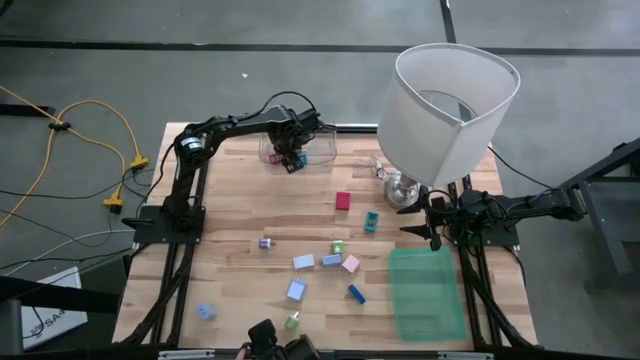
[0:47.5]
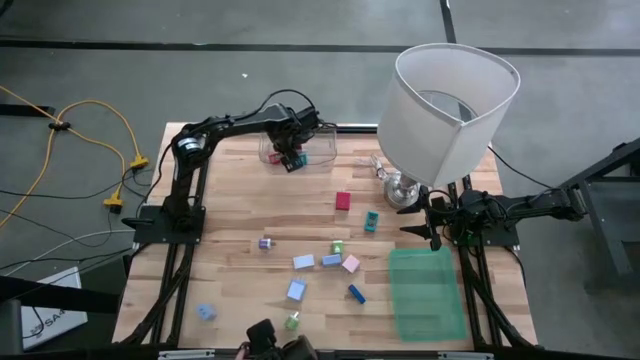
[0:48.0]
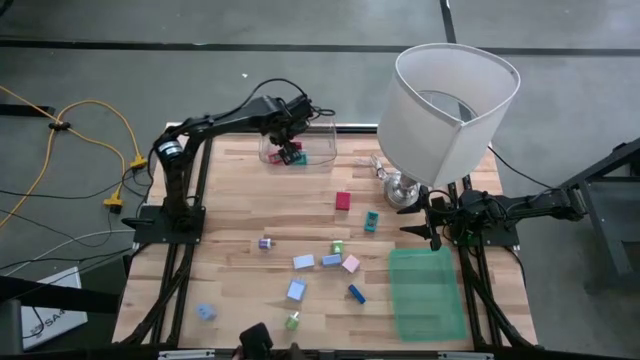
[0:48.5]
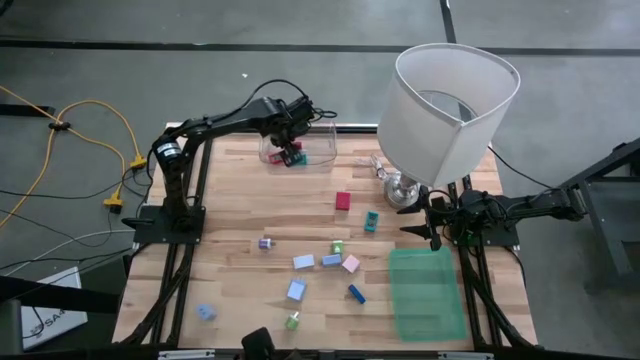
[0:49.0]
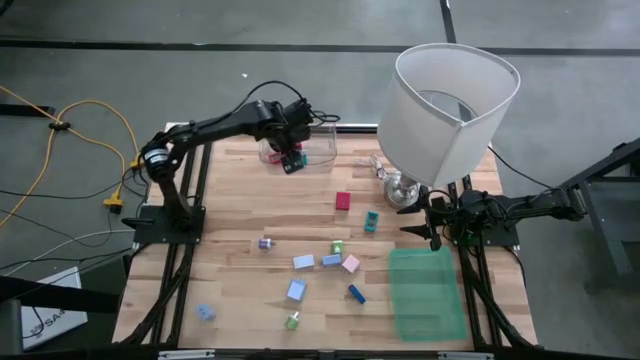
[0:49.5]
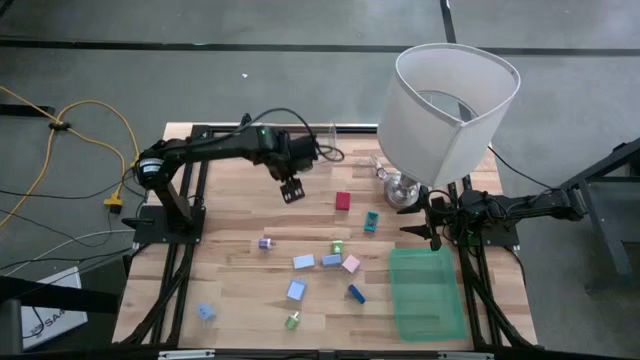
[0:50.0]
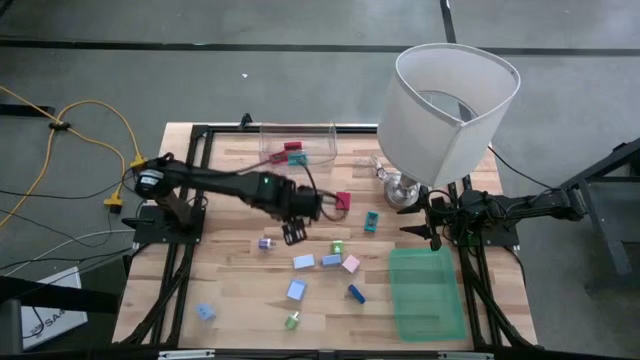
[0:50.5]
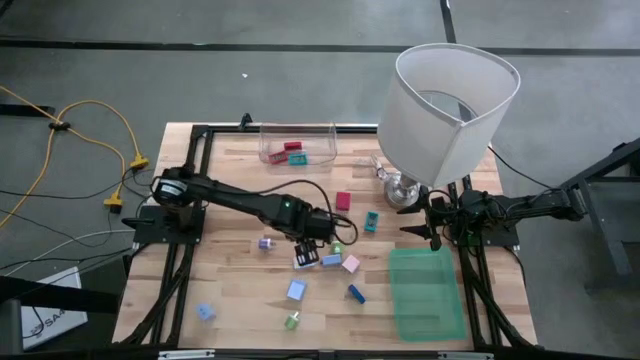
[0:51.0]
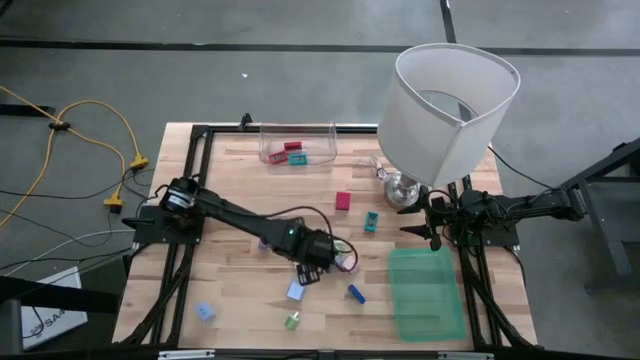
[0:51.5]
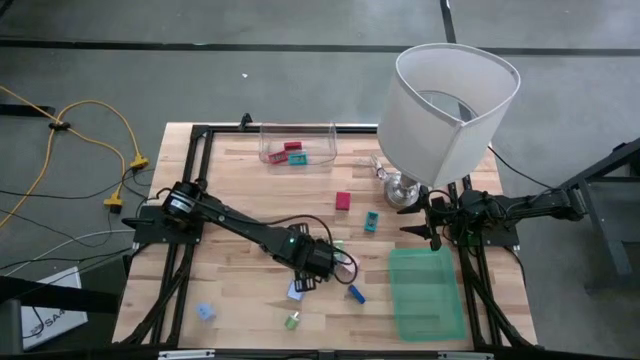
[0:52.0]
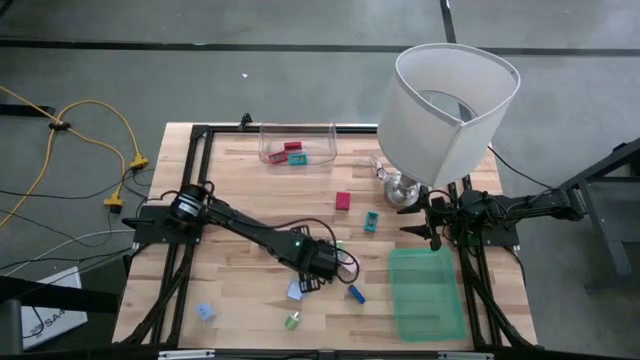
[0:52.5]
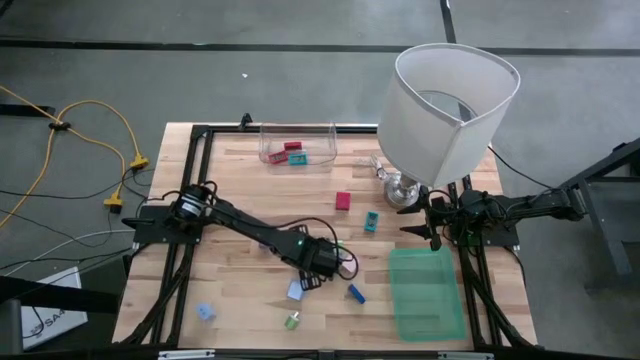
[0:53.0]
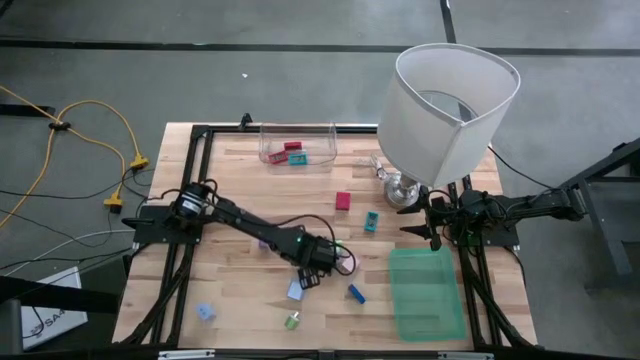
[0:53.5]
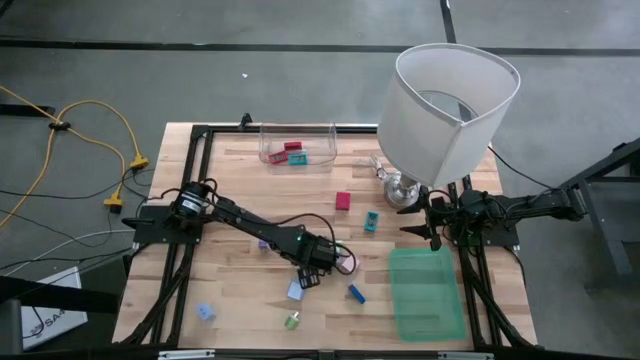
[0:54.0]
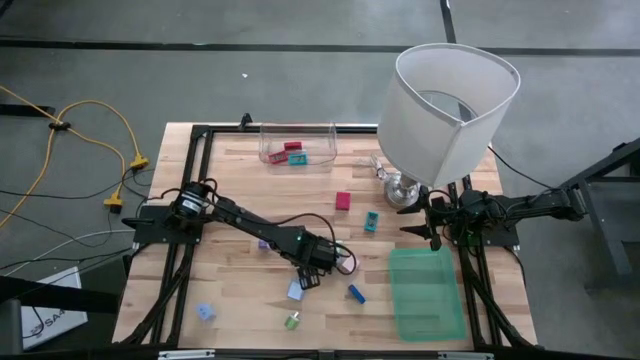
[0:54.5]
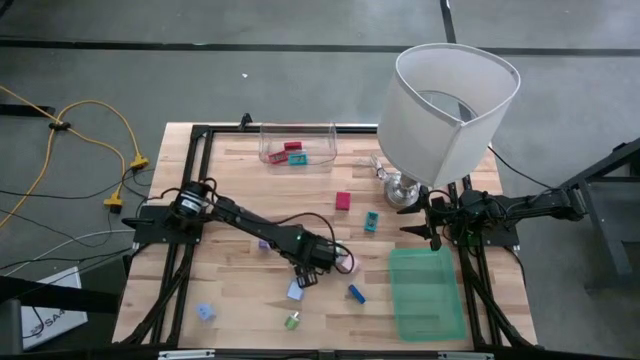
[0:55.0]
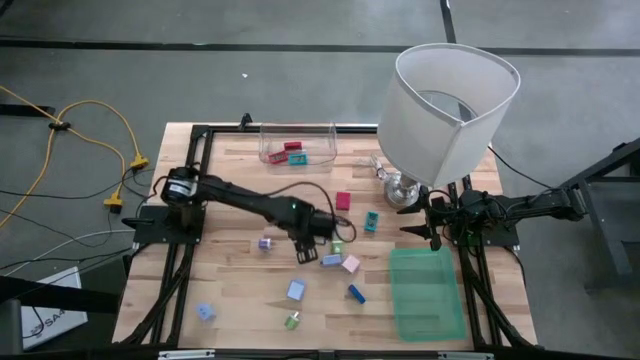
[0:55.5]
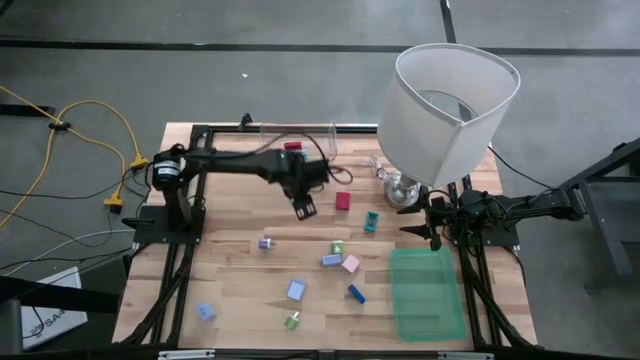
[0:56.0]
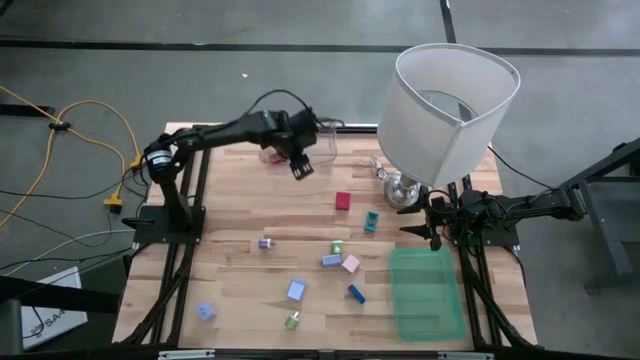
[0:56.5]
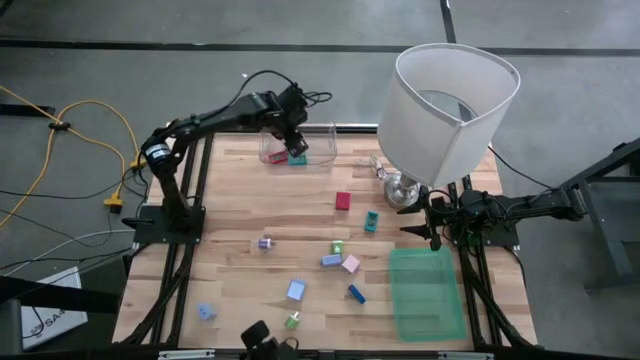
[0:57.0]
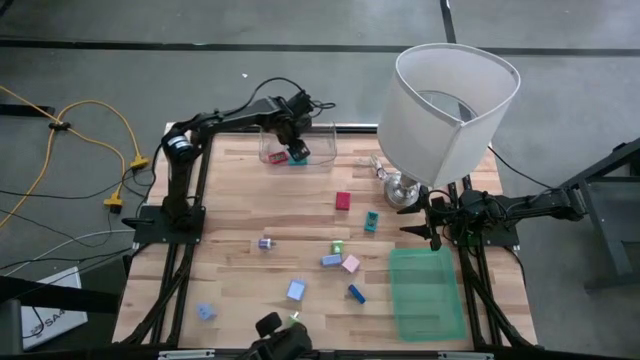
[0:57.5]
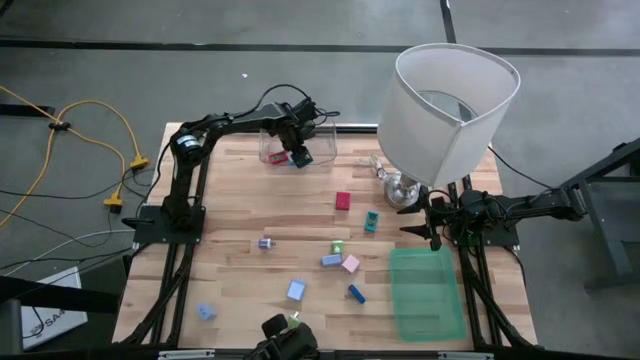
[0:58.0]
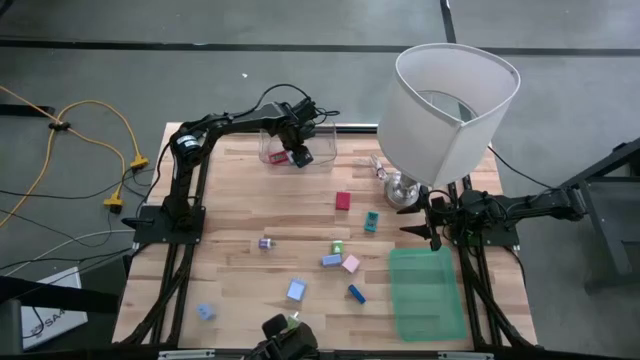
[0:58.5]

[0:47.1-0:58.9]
Task: Pick & Place Office items
Put the white digital clock into the transparent bin

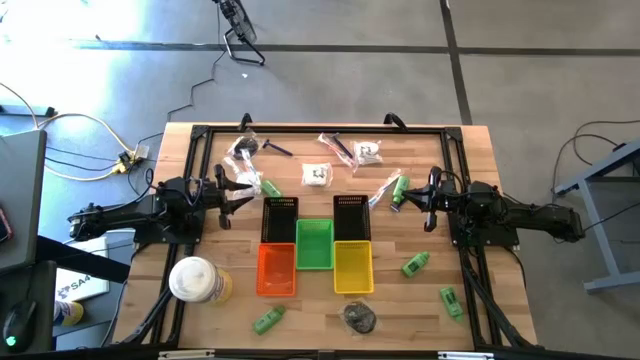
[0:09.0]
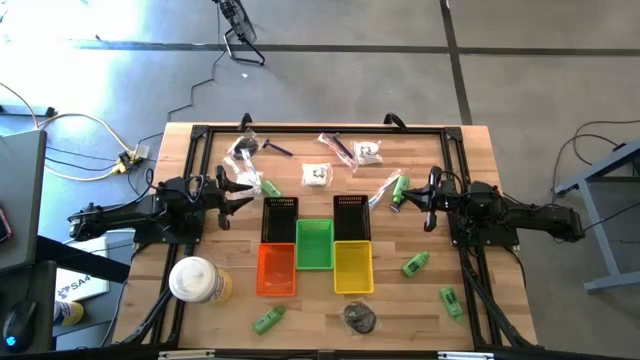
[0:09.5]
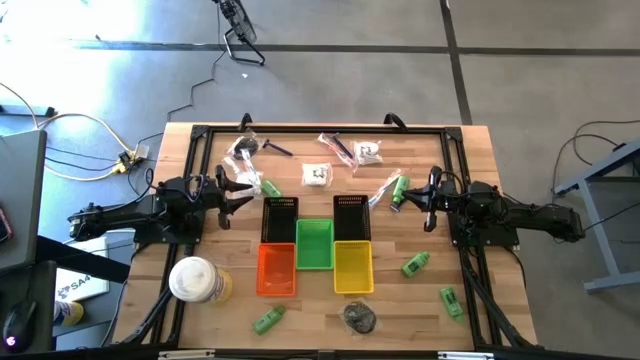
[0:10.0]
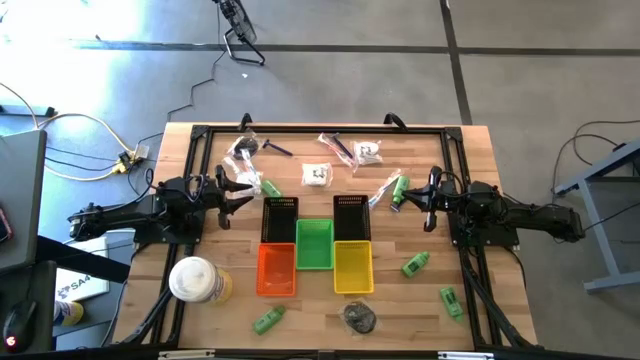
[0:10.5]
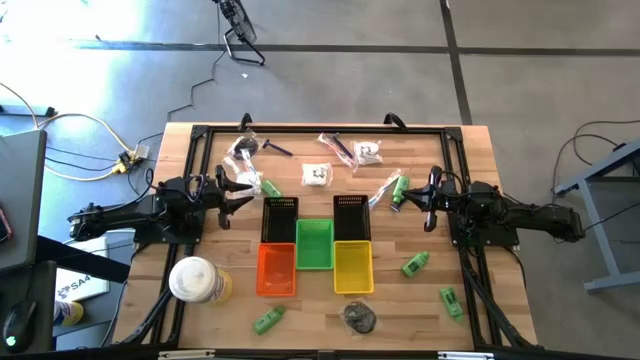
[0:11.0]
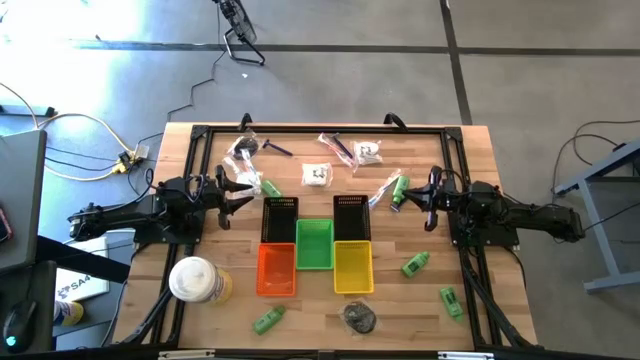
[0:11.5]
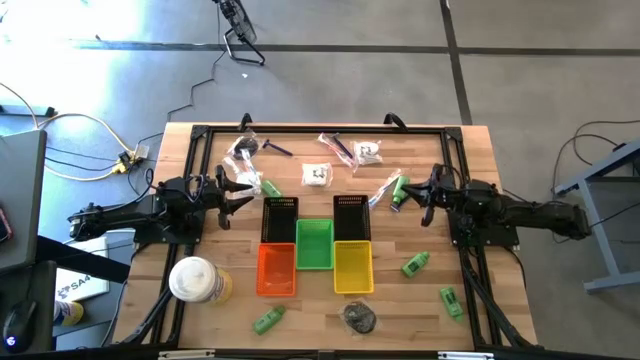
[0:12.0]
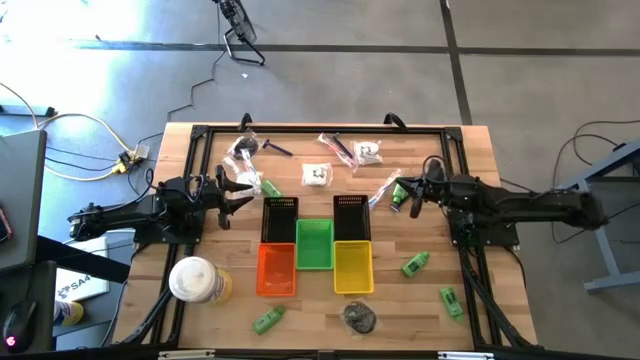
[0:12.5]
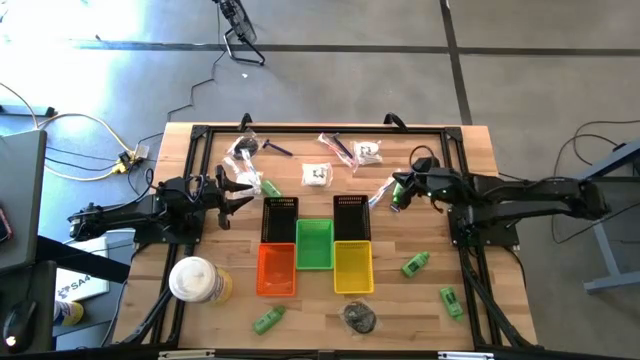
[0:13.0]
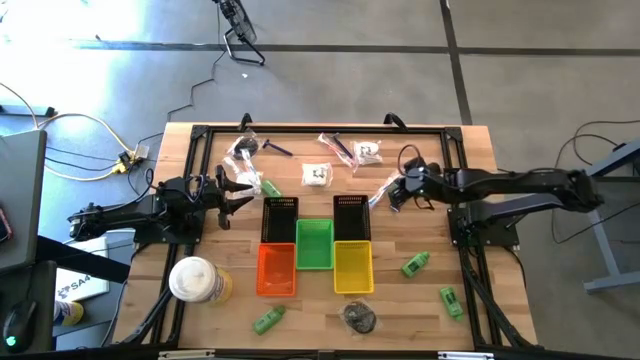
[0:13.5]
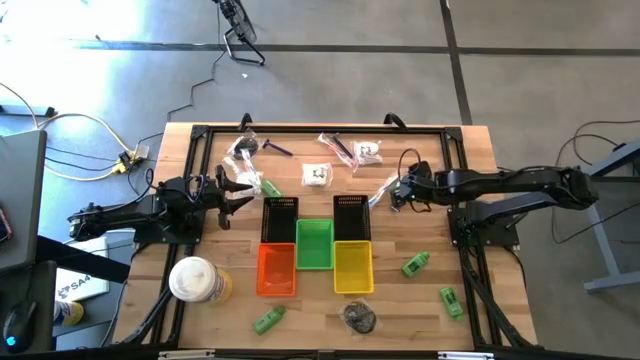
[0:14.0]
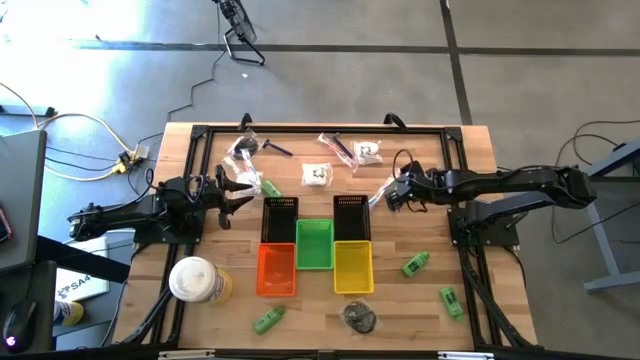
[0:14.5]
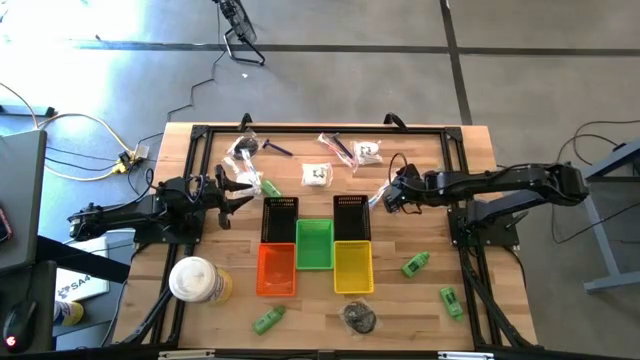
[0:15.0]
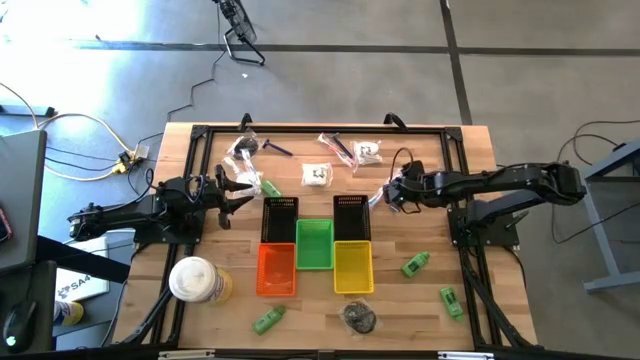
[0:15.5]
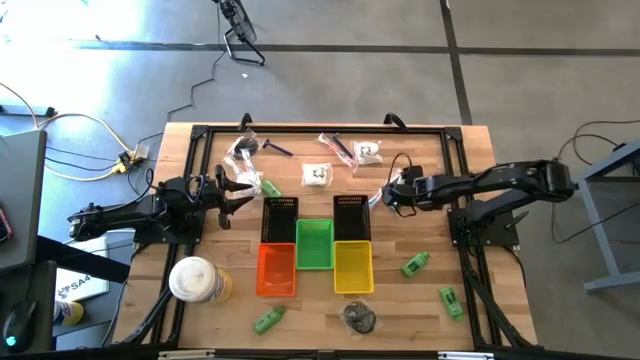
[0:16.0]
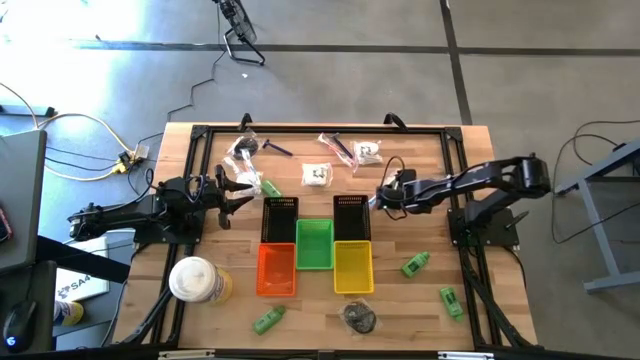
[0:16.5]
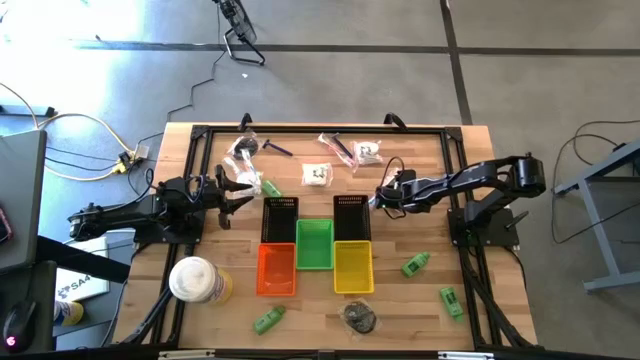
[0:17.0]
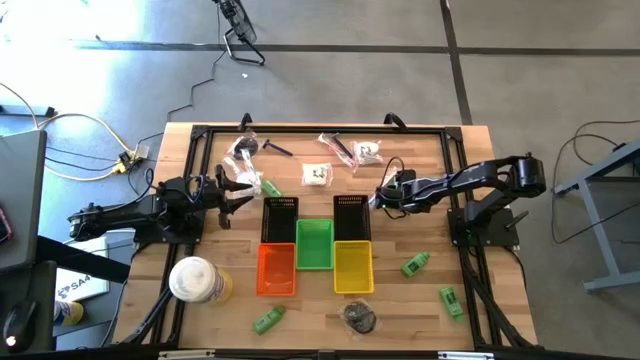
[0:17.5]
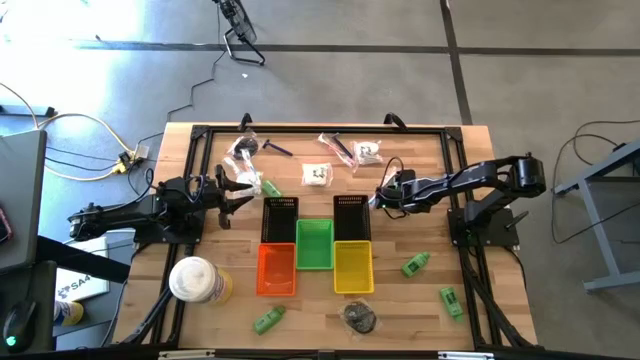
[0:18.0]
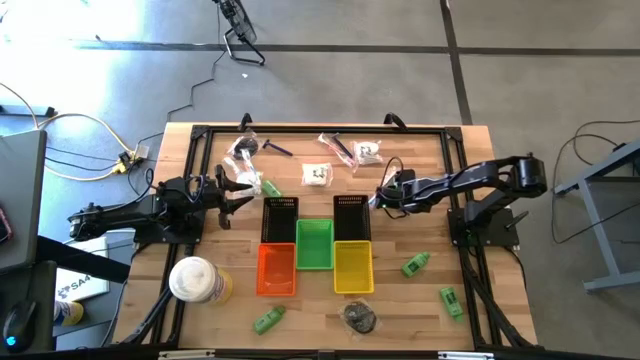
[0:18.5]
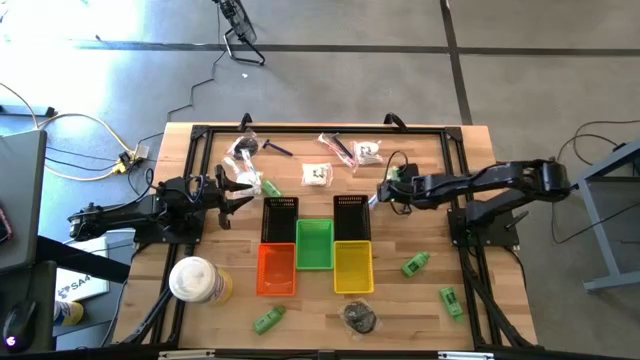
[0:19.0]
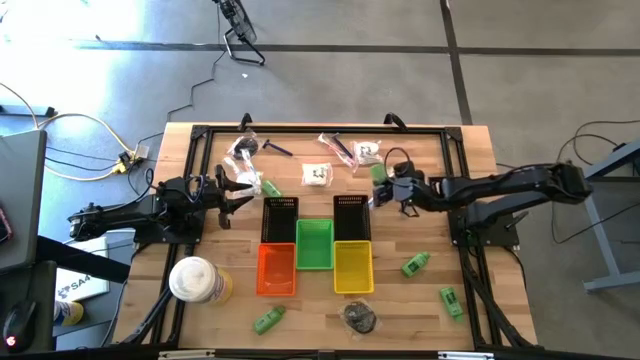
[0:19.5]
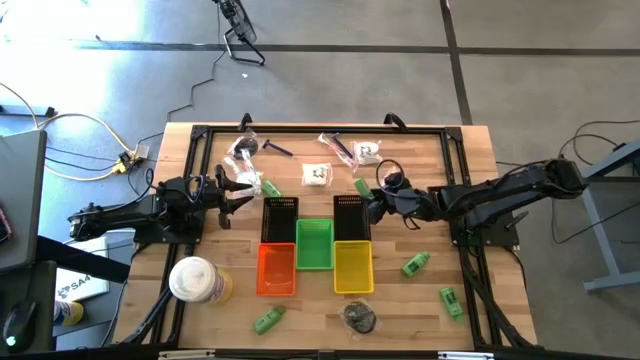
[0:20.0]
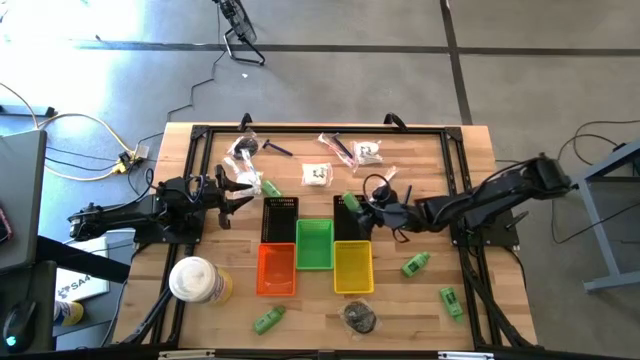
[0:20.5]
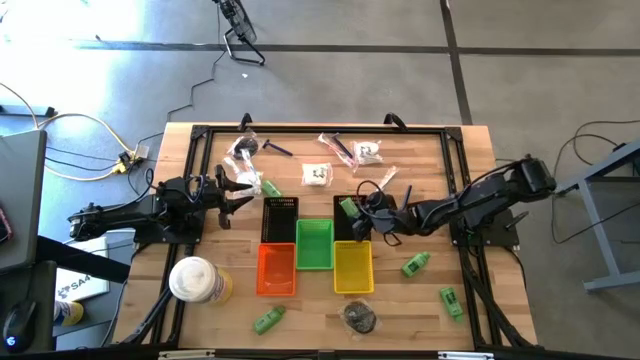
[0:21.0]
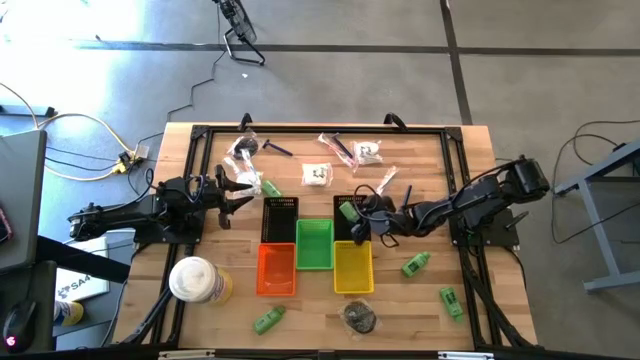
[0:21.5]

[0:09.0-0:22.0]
Task: Pick & Place Travel size toiletries
Put the green shampoo into the right black bin
